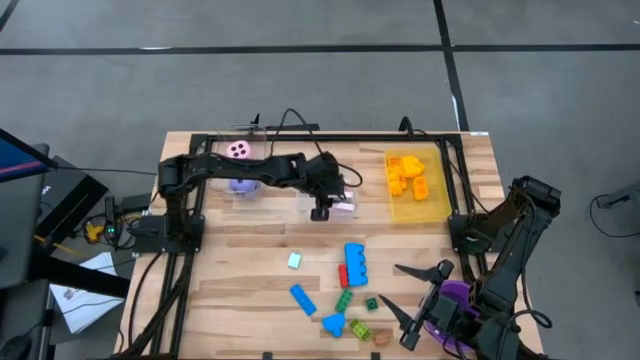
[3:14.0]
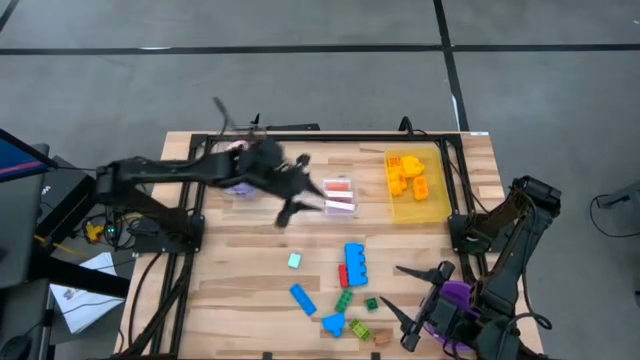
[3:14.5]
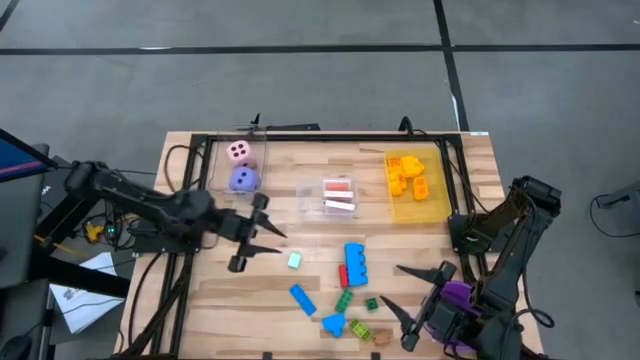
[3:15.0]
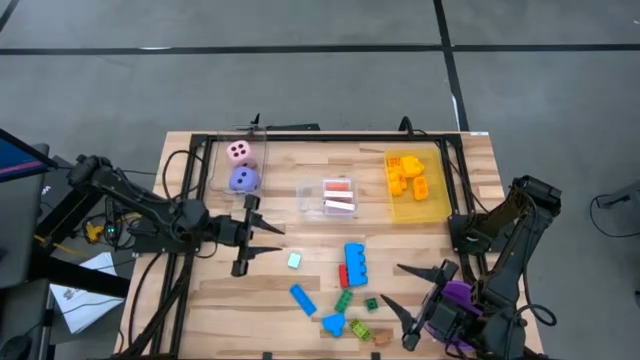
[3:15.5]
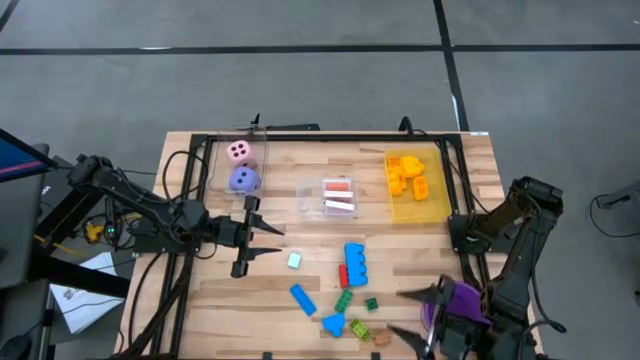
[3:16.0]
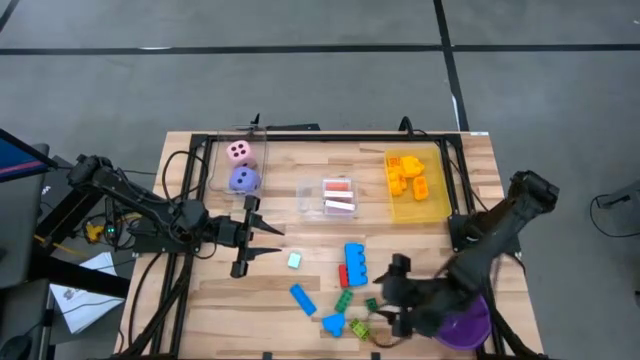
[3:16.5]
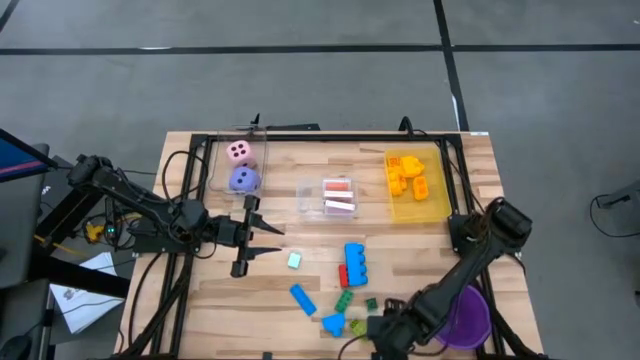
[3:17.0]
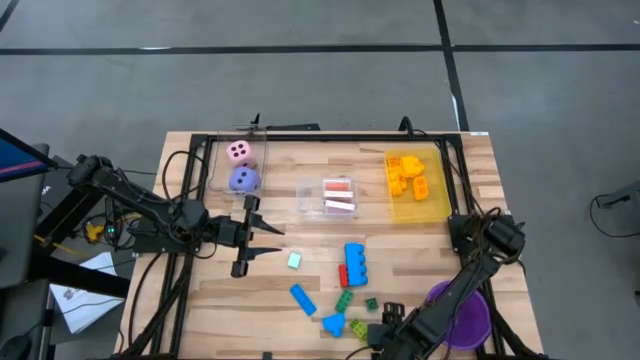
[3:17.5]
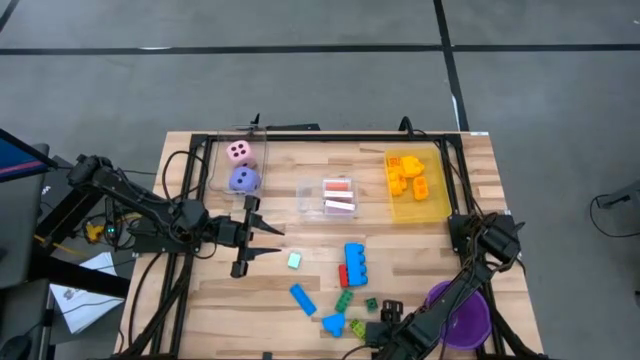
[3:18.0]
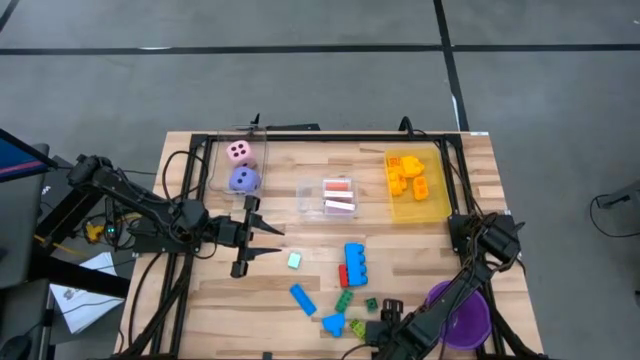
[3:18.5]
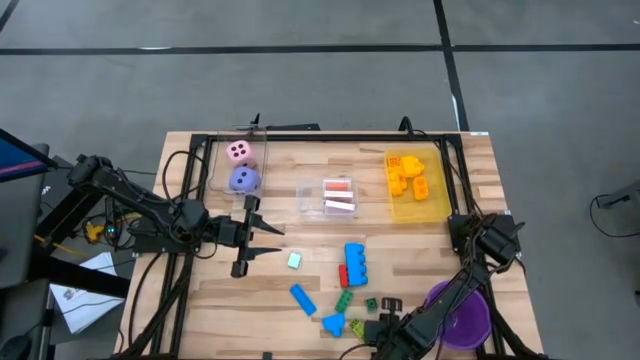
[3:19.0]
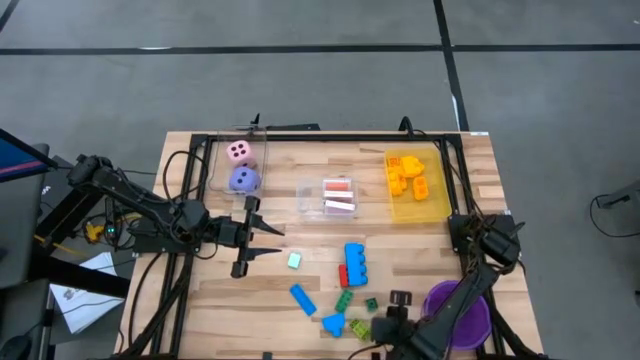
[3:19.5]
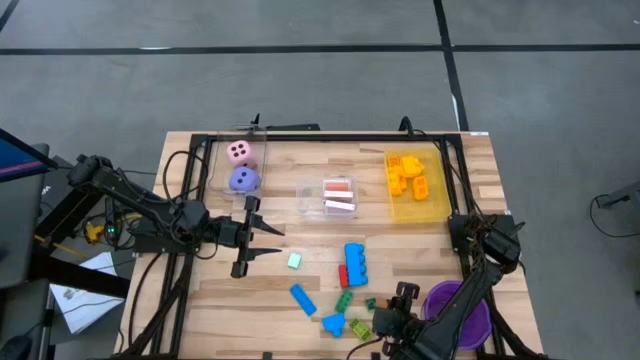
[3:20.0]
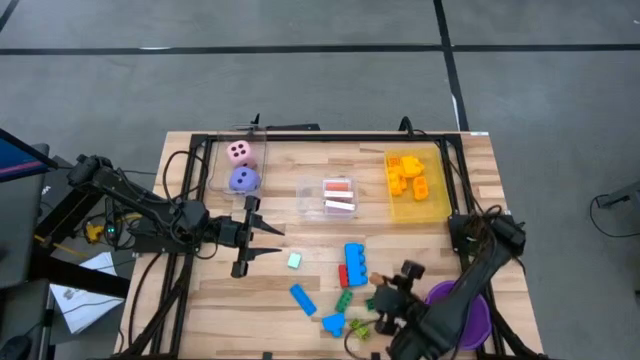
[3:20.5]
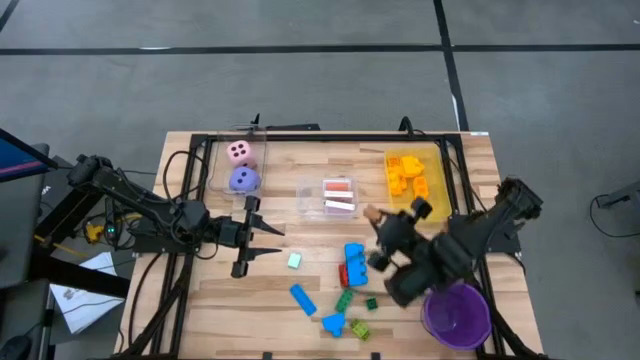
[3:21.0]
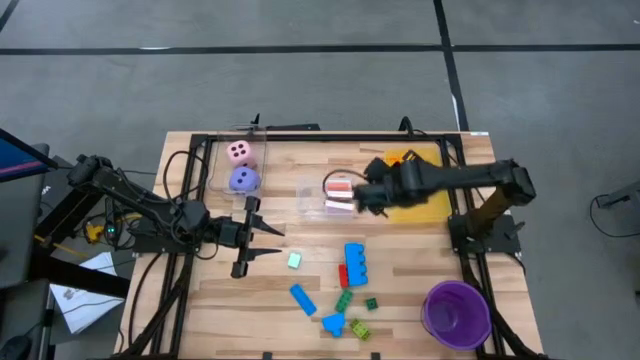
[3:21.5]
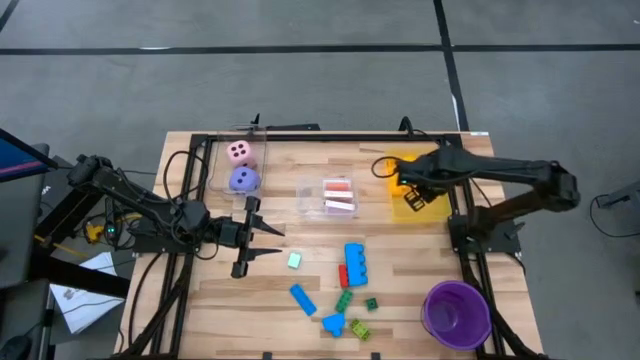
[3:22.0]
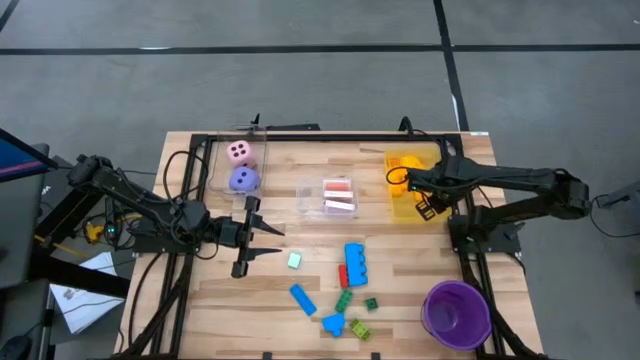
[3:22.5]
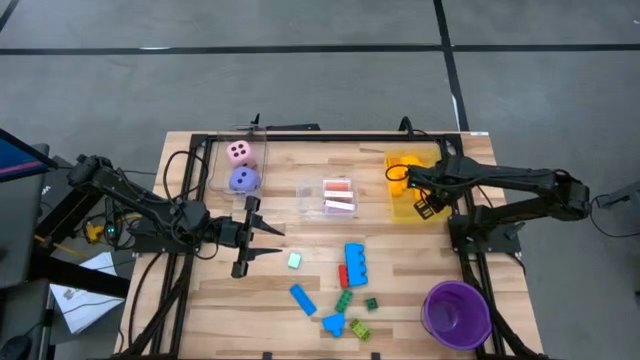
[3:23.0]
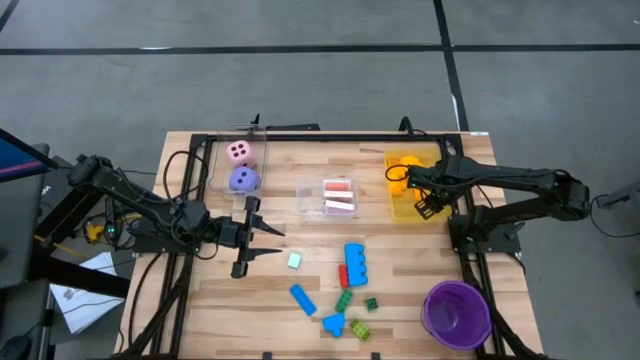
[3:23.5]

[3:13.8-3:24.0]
Task: Pick & Place Toys
Put the brown game piece into the yellow bin

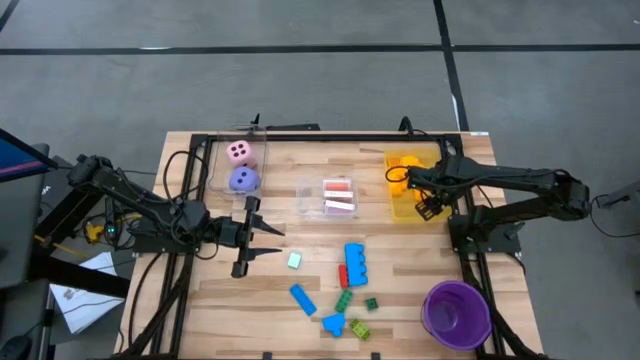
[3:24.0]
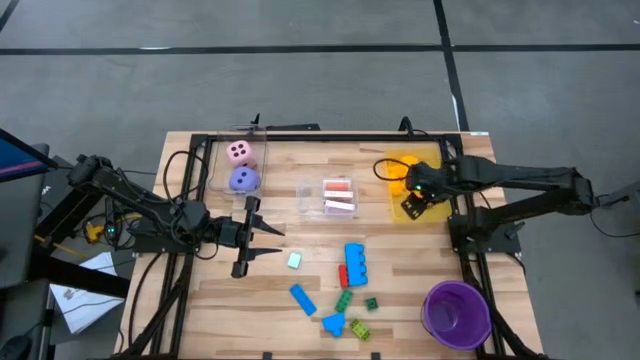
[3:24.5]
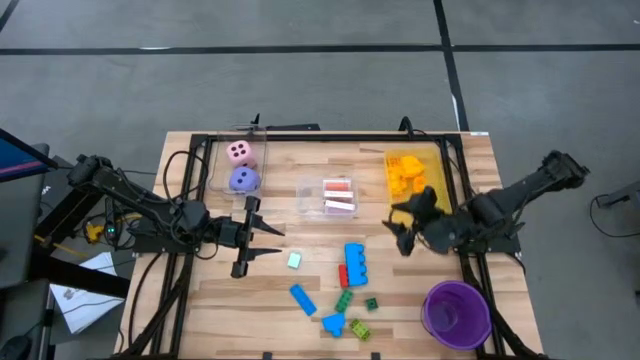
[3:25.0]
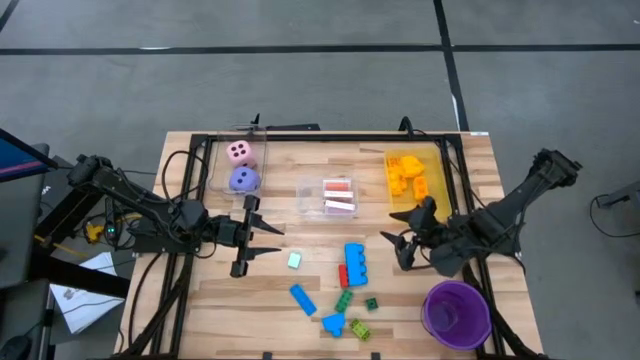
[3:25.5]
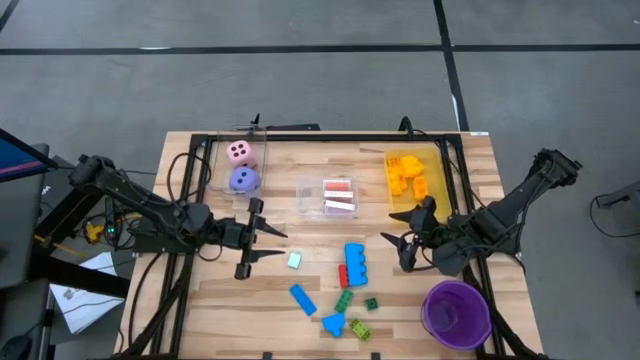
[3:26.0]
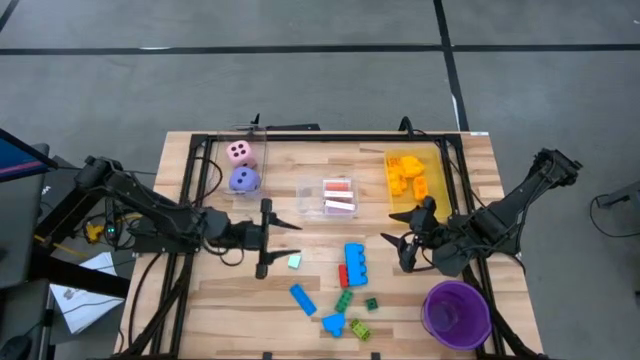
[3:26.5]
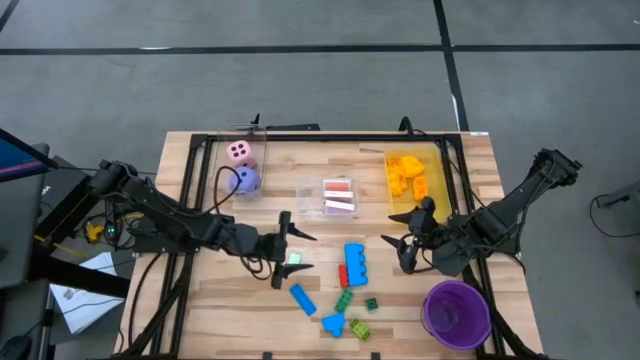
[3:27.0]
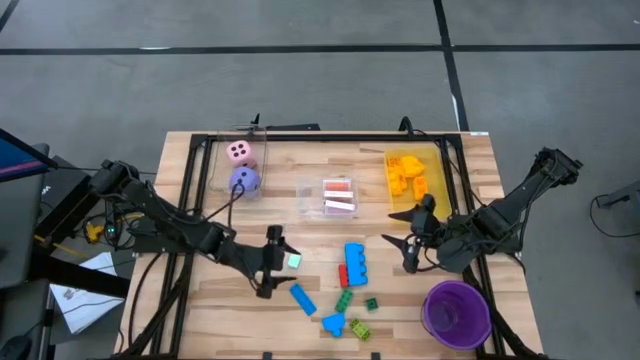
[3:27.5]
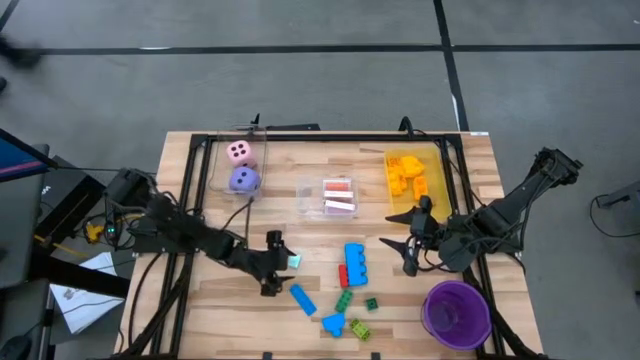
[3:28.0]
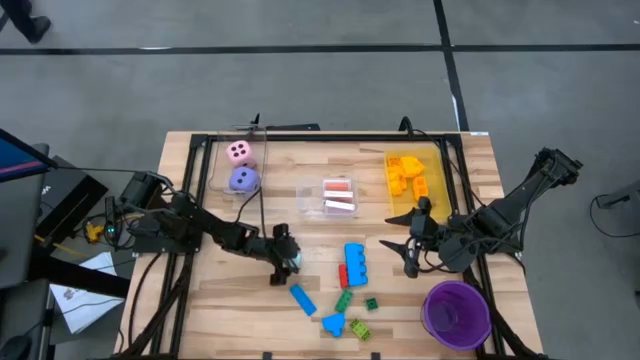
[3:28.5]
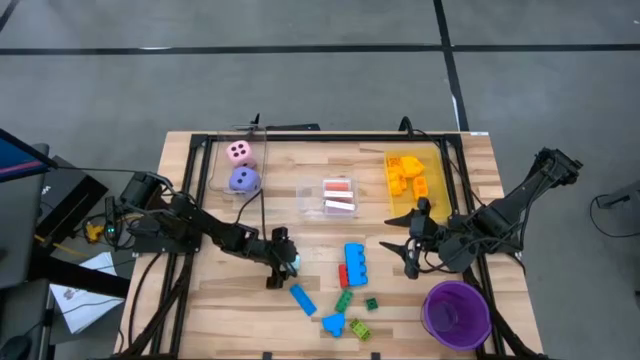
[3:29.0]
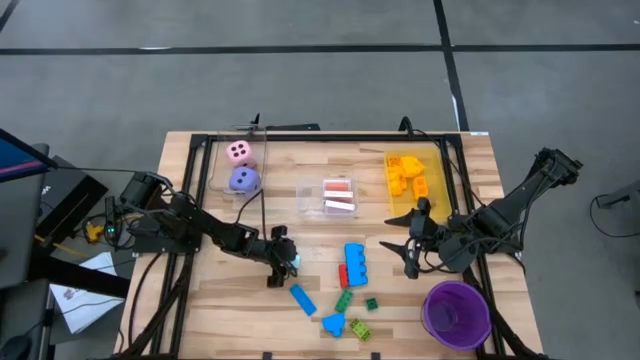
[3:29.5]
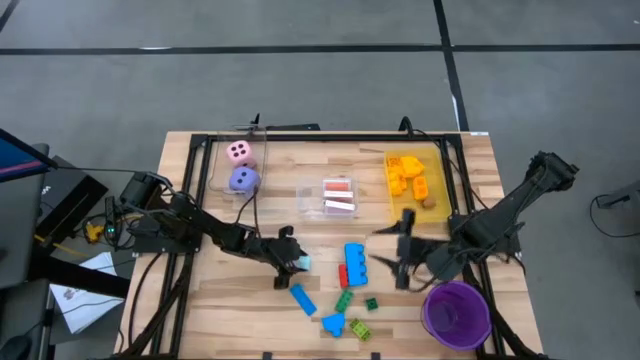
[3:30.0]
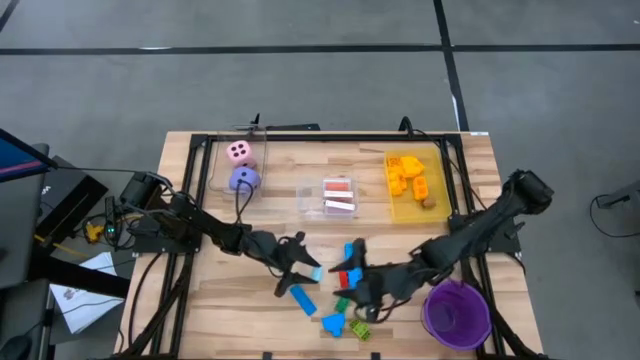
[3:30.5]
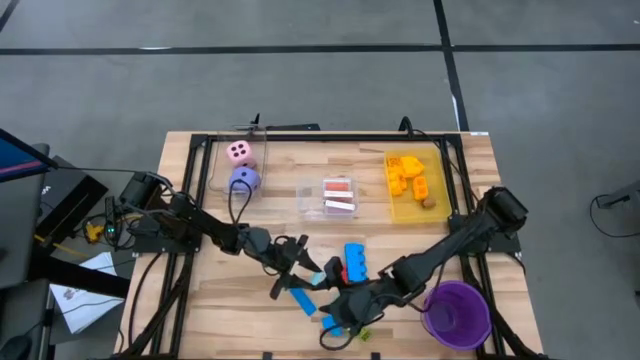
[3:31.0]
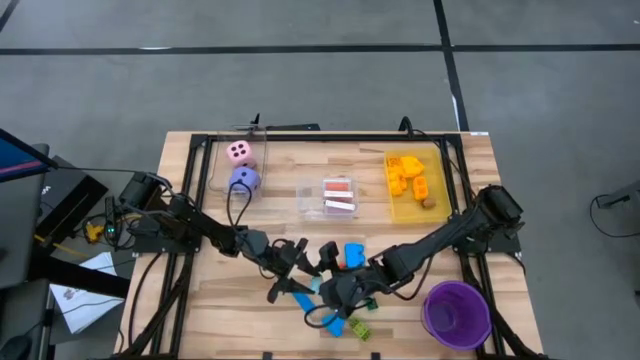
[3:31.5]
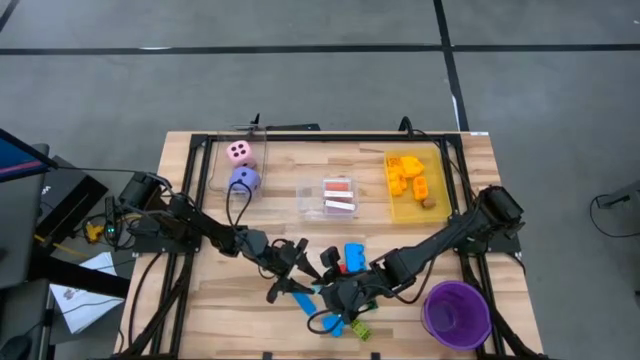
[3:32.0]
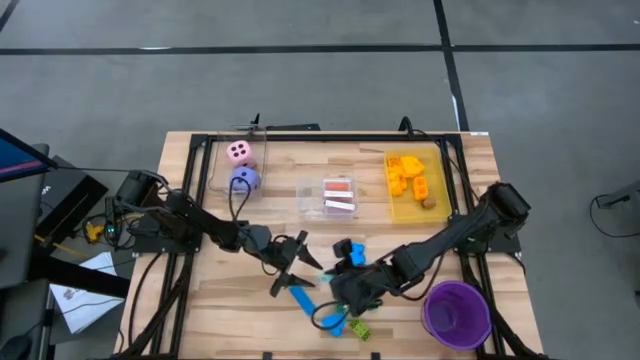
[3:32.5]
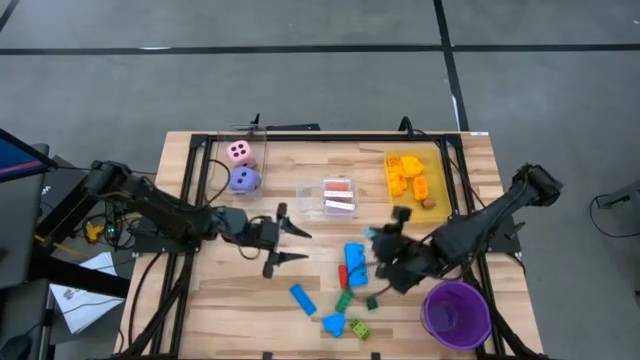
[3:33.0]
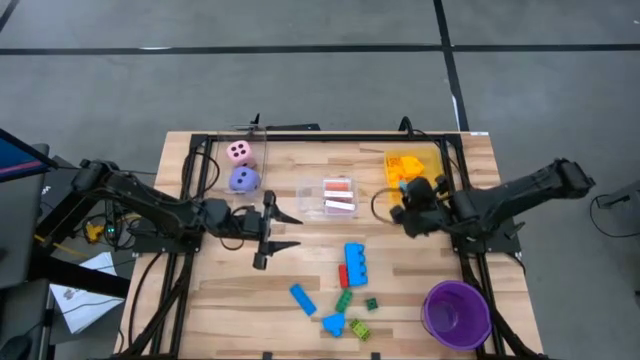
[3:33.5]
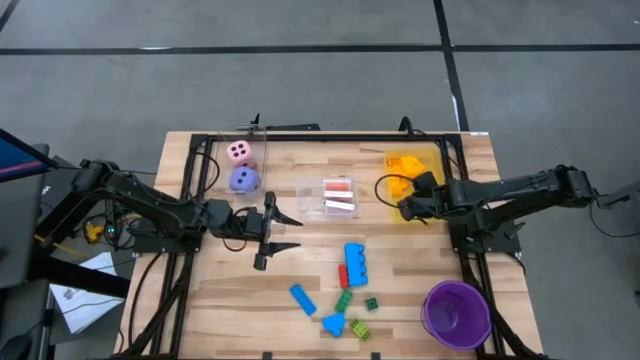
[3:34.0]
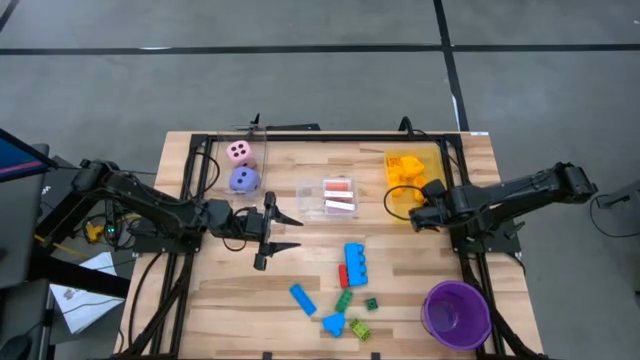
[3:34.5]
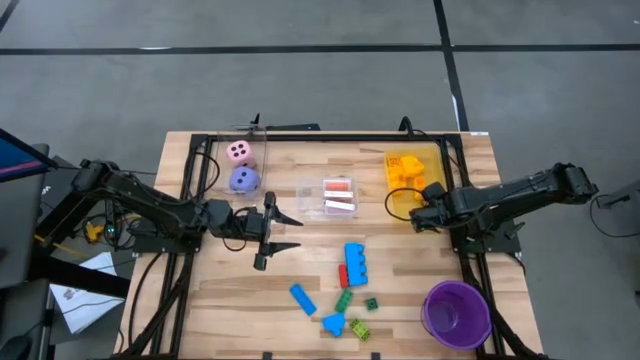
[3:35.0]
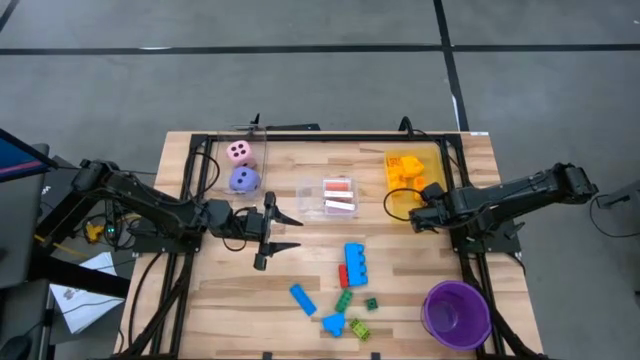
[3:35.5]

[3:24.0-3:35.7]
Put the light blue game piece into the yellow bin
